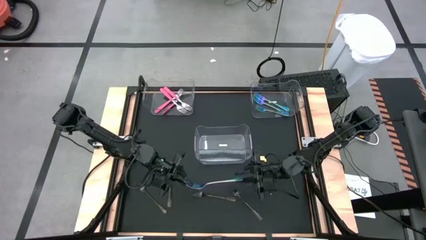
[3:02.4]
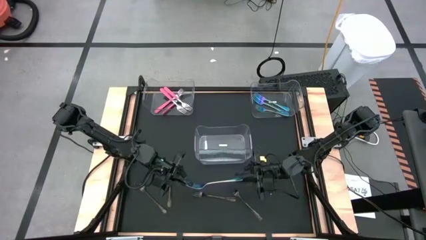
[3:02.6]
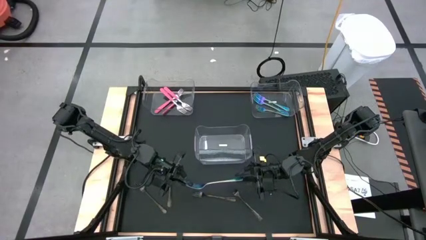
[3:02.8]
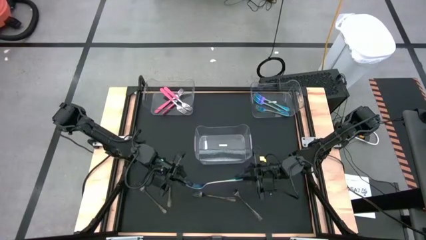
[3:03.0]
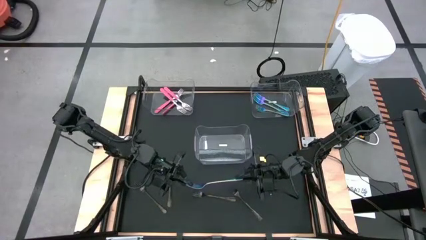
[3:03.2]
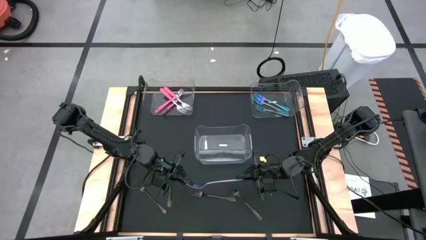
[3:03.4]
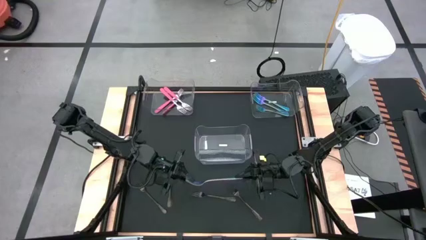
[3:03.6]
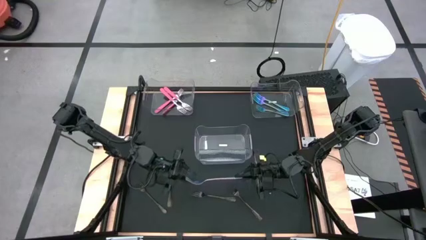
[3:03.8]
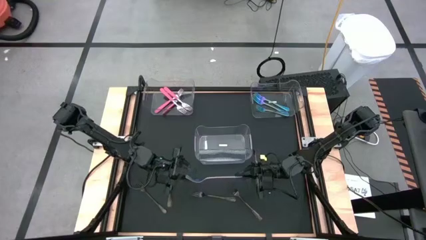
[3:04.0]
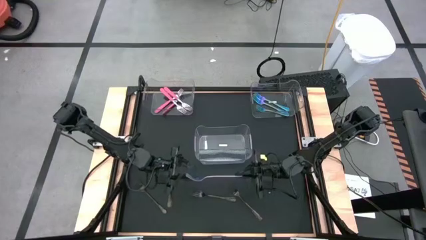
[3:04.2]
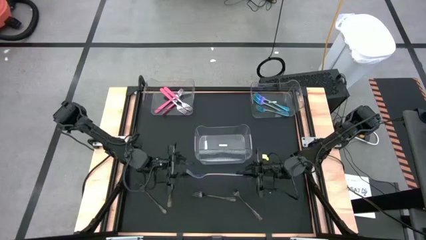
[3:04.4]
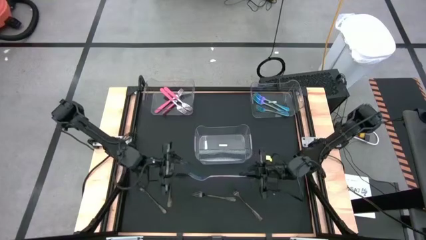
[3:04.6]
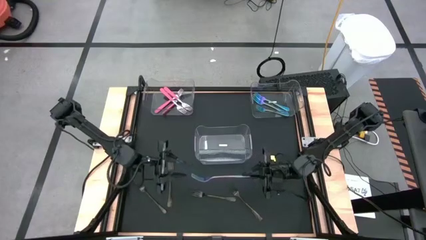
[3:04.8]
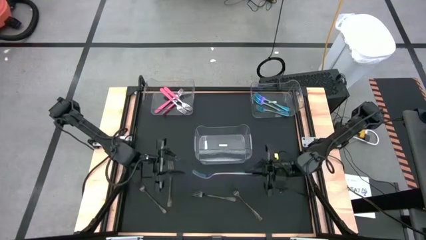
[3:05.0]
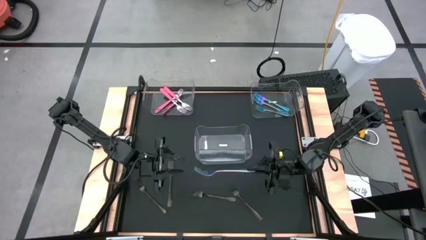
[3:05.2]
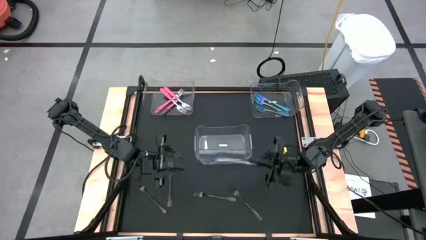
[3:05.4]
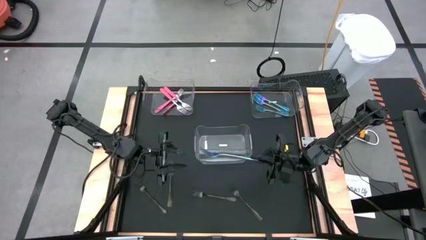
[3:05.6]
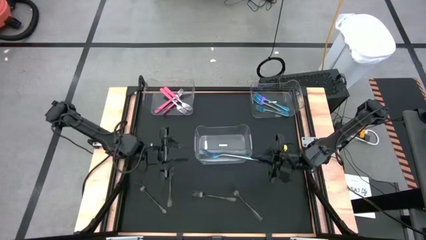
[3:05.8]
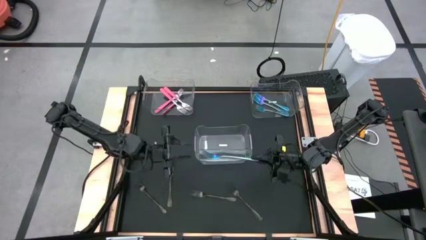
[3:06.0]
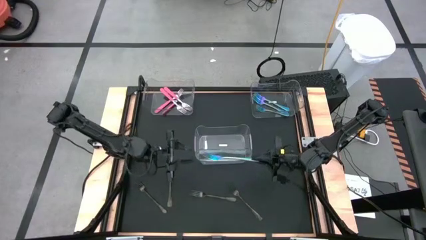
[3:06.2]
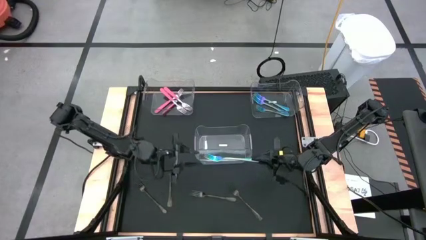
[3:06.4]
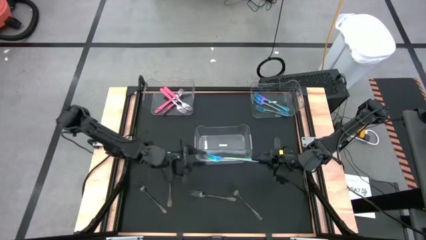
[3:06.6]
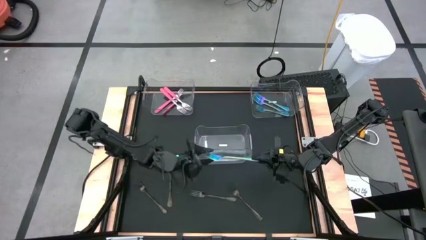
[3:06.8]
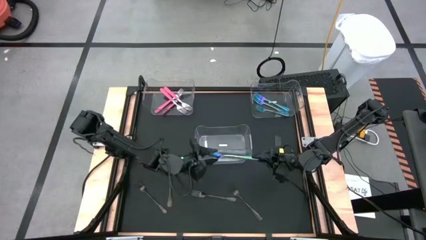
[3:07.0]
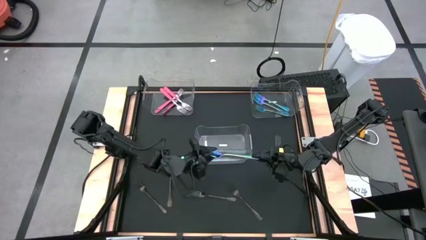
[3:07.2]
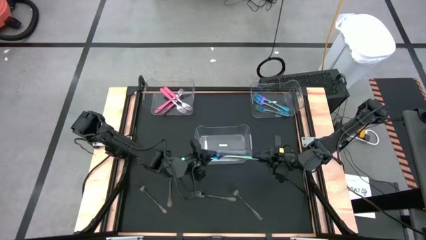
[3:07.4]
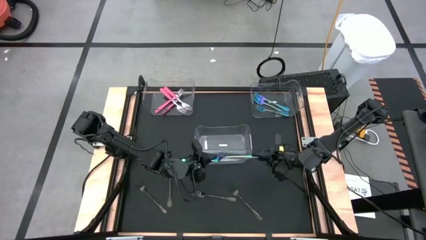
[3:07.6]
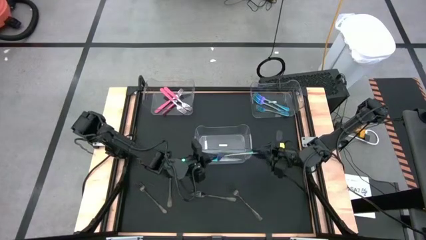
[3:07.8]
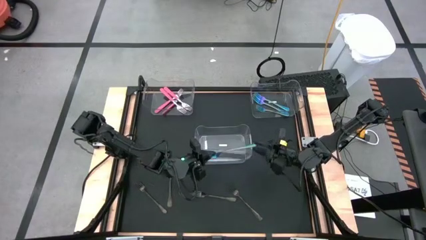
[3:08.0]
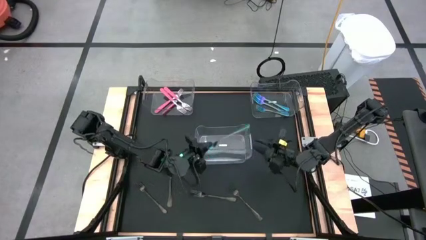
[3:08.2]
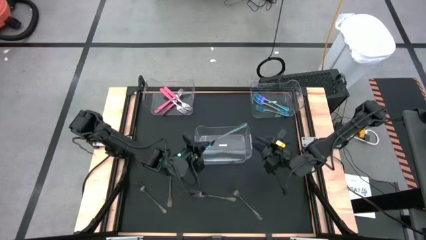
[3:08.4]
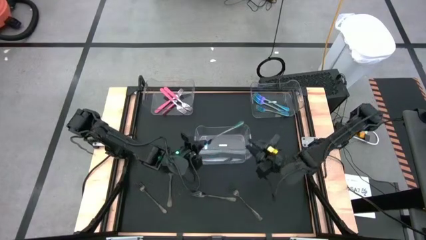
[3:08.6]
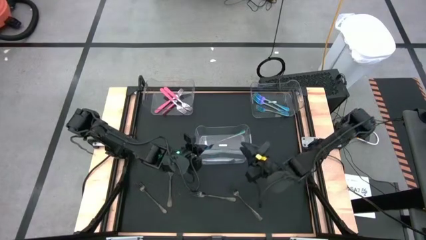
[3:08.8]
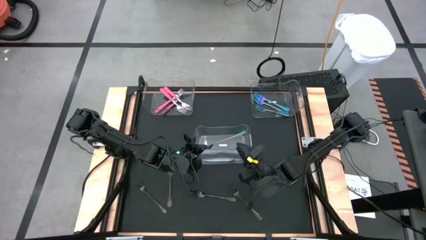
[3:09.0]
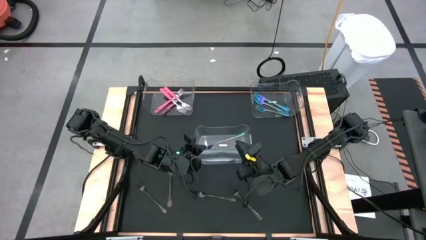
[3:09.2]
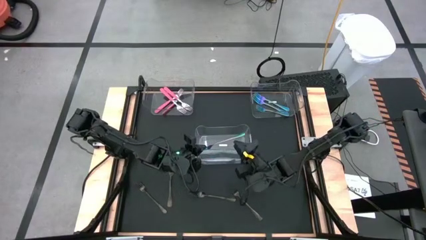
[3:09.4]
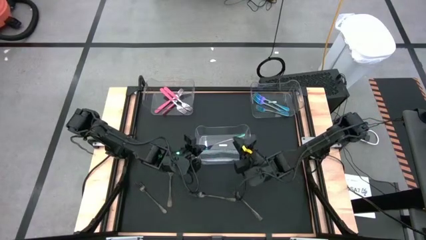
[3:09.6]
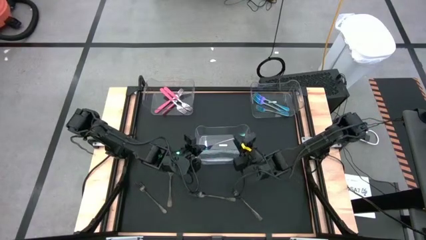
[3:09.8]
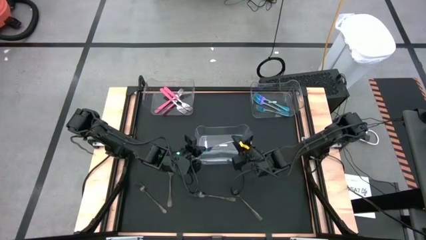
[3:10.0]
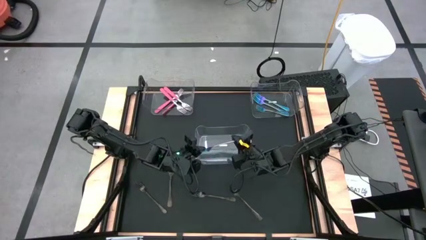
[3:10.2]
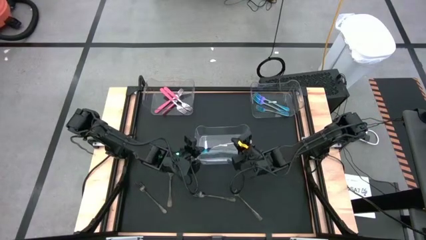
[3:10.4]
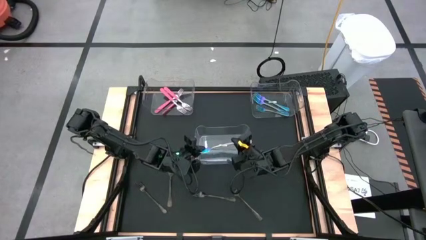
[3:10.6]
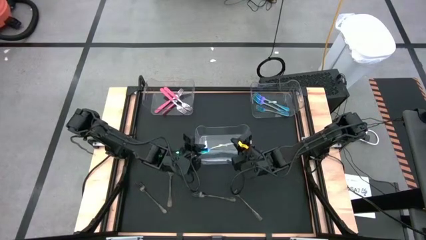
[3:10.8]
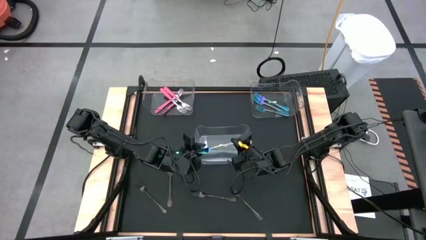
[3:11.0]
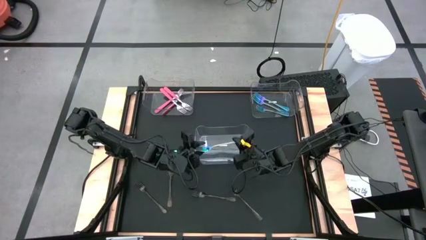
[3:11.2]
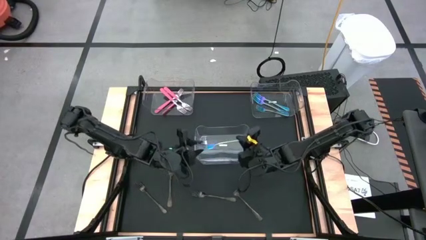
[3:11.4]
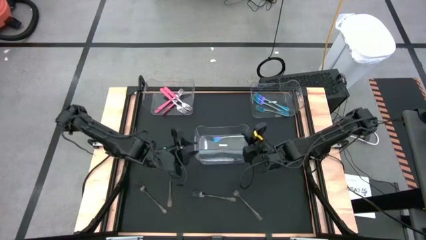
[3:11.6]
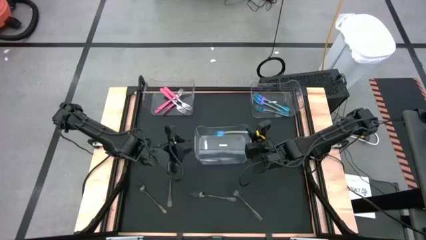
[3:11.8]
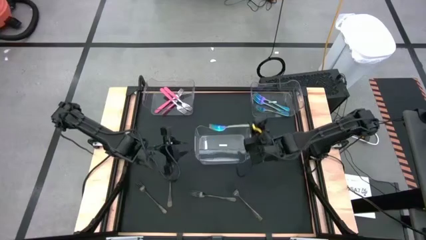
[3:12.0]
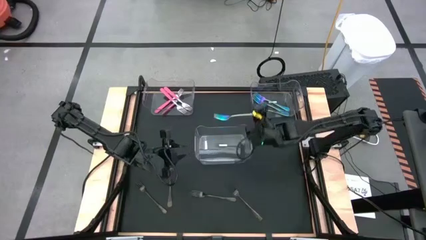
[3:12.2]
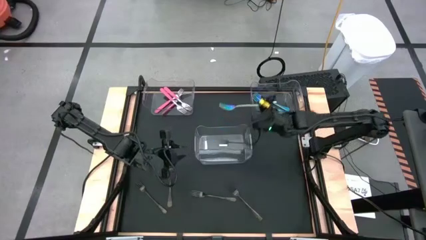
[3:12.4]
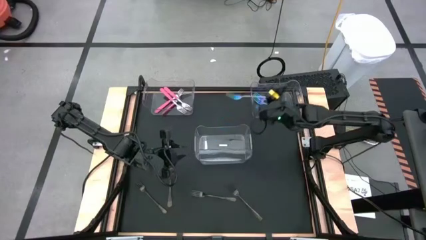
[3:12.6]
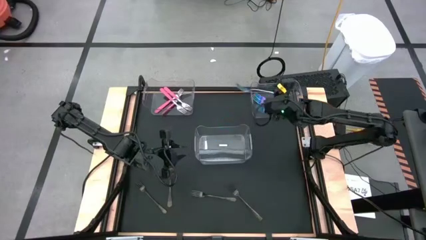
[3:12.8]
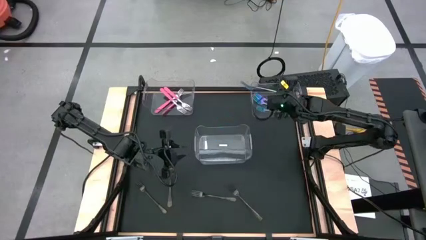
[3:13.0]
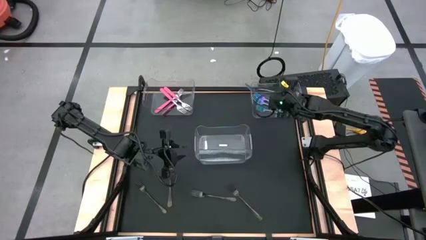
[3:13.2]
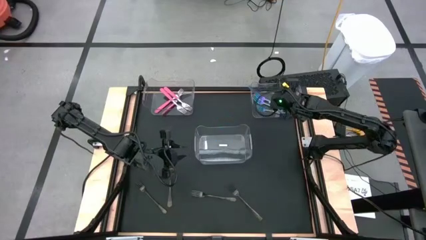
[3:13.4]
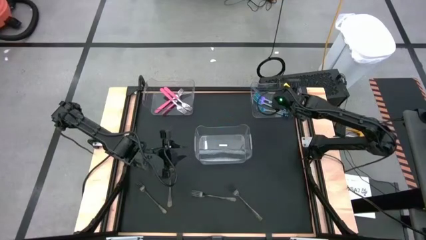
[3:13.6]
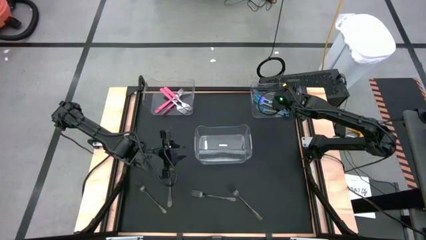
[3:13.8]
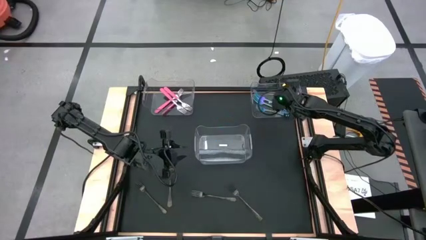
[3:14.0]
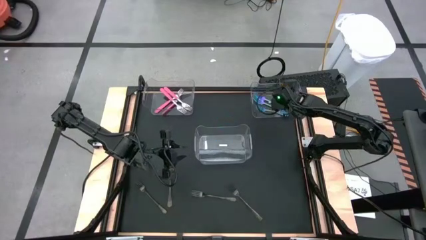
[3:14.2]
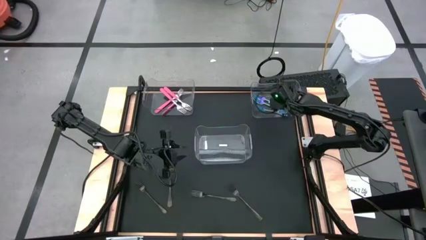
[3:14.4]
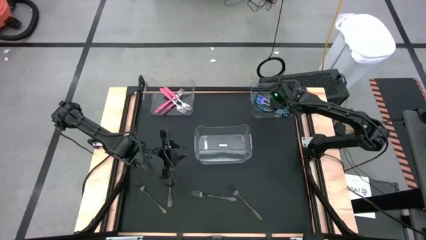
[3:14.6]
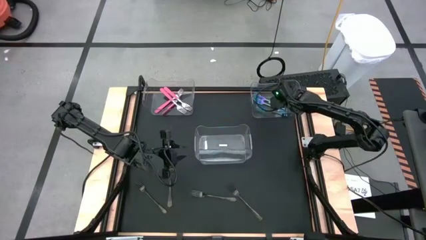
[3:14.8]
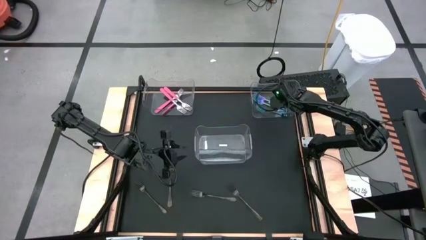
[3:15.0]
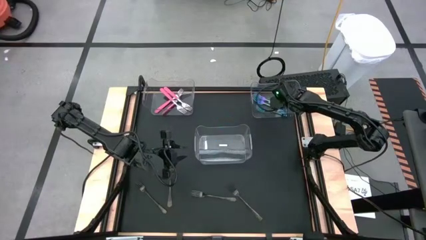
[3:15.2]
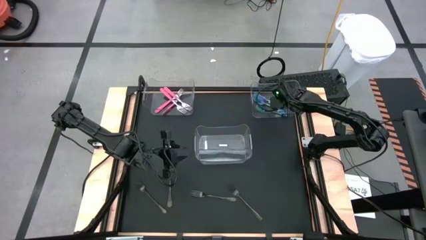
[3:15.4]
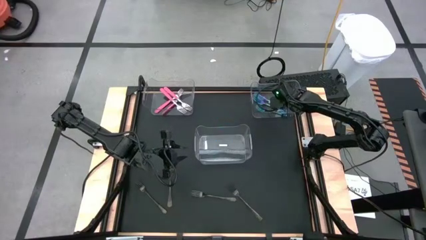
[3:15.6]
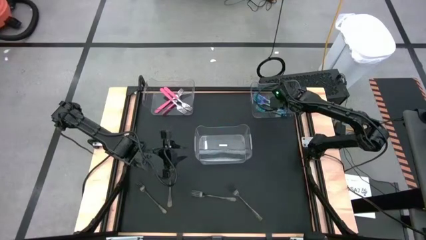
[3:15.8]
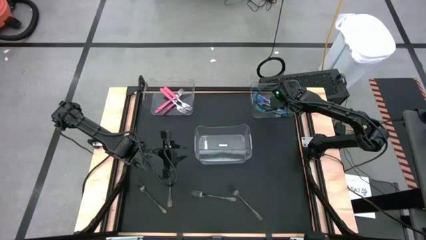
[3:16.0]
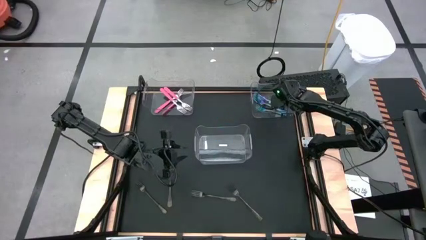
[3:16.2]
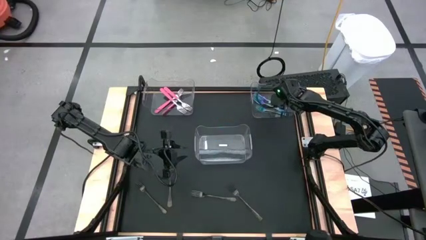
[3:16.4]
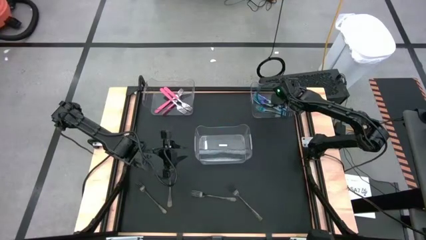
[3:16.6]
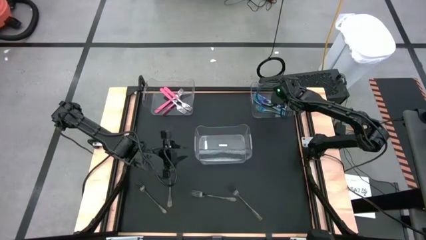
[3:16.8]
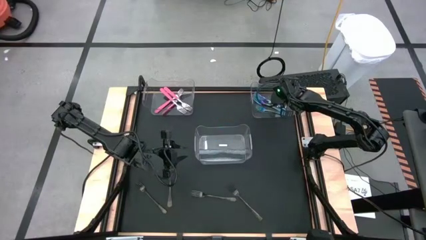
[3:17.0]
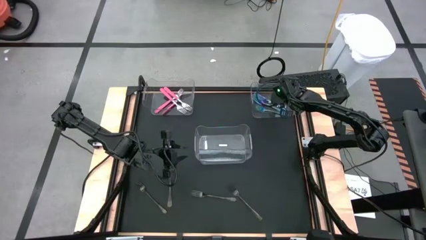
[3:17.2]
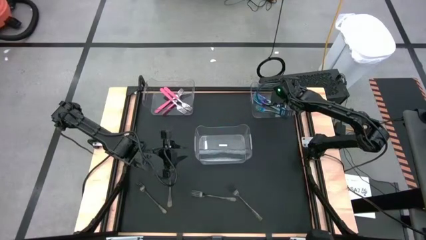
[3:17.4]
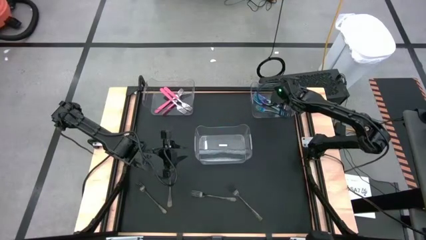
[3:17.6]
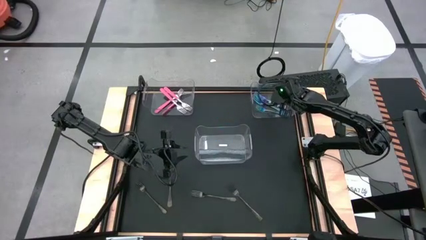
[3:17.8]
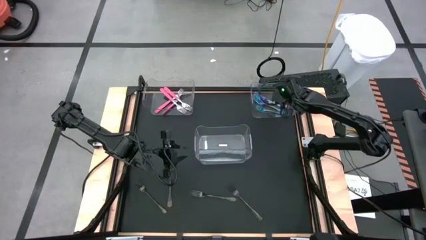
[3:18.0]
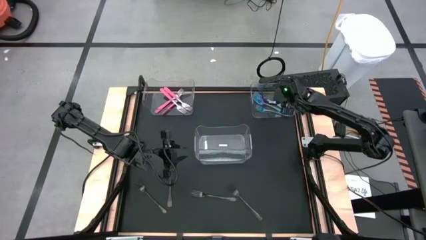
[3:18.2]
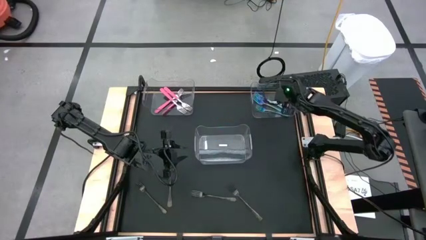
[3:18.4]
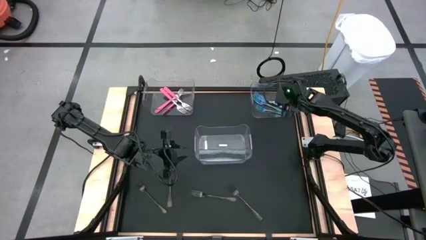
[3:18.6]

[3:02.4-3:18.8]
Task: Sort silverware by color (type)
Put the blue fork into the right transparent bin

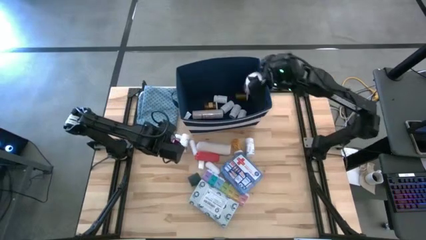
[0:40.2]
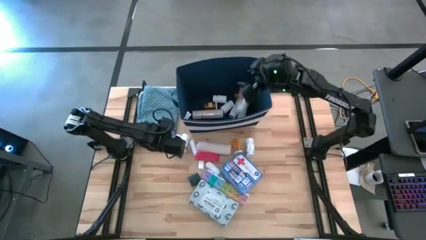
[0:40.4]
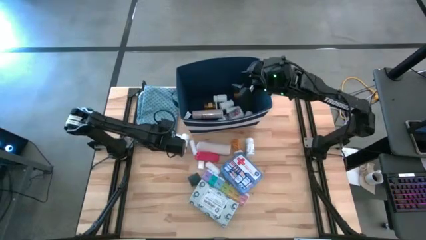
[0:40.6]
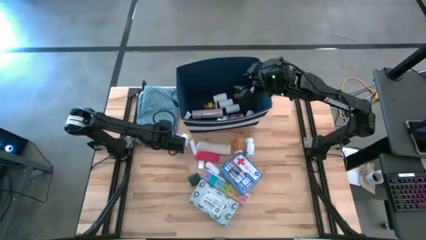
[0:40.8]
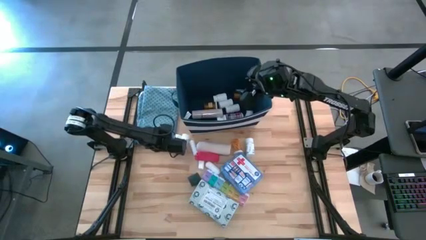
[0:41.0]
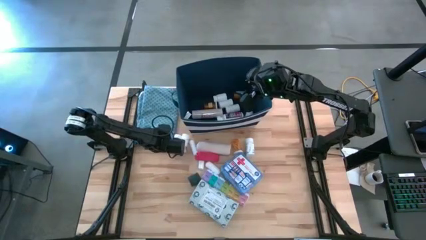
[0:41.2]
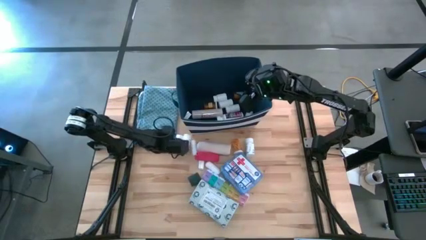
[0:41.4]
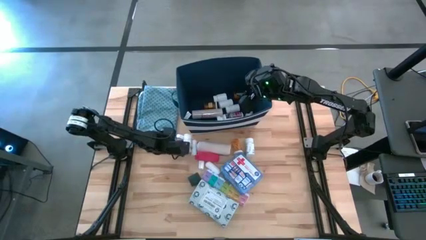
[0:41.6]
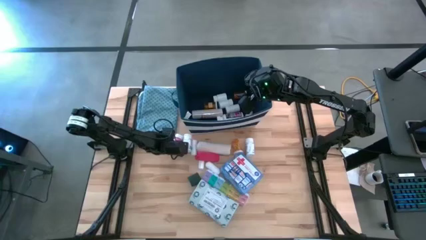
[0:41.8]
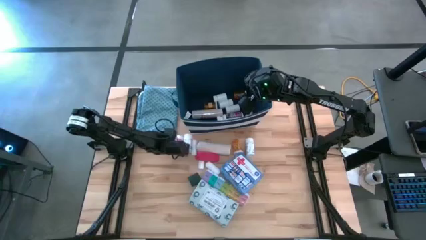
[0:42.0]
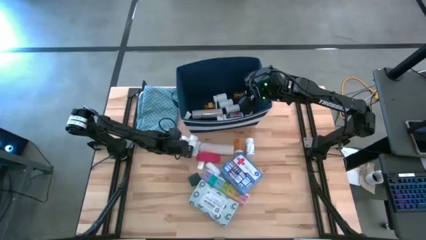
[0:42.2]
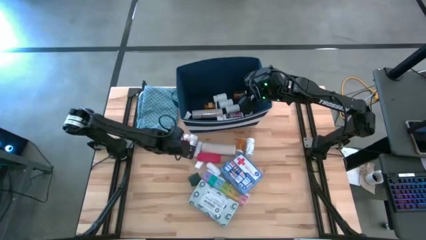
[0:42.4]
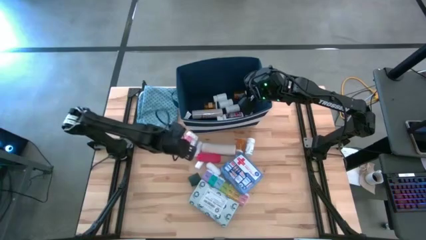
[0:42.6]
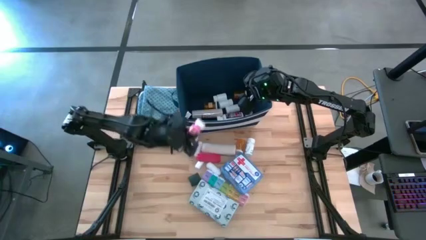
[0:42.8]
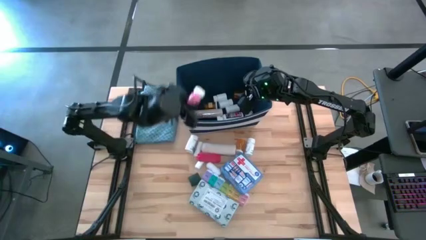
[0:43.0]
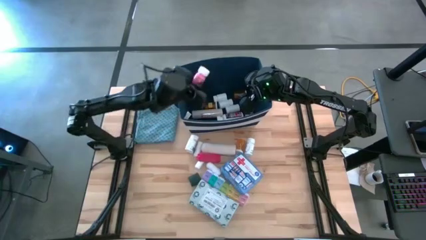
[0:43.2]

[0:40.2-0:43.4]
Task: Pick & place medical supplies in basket/bin
Put the pink bottle into the blue bin
